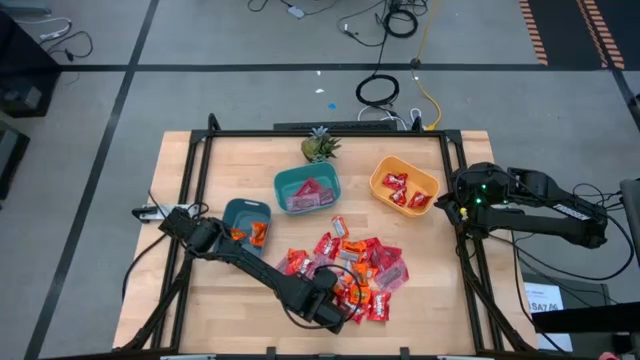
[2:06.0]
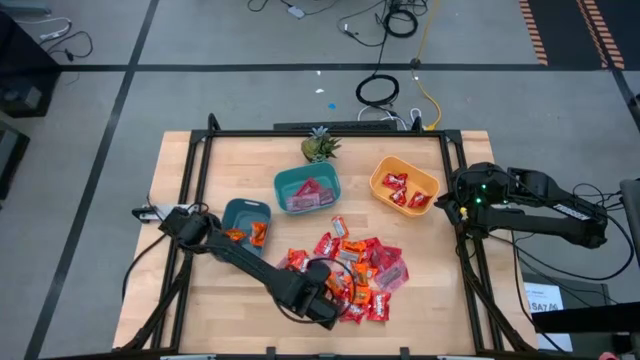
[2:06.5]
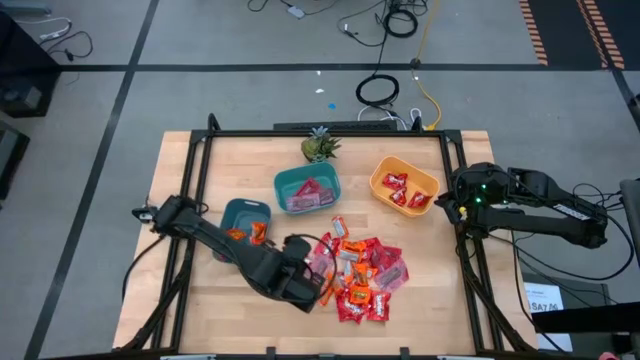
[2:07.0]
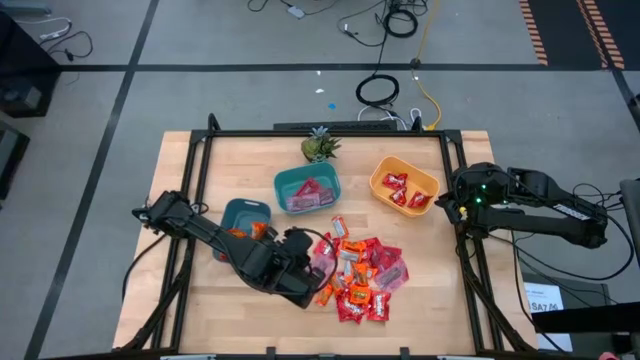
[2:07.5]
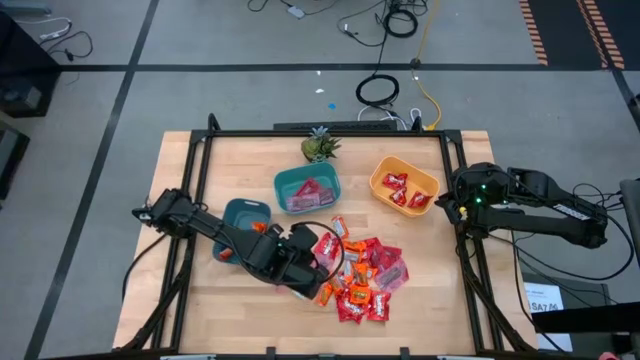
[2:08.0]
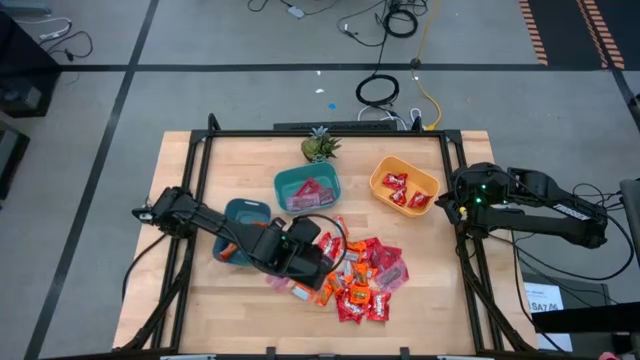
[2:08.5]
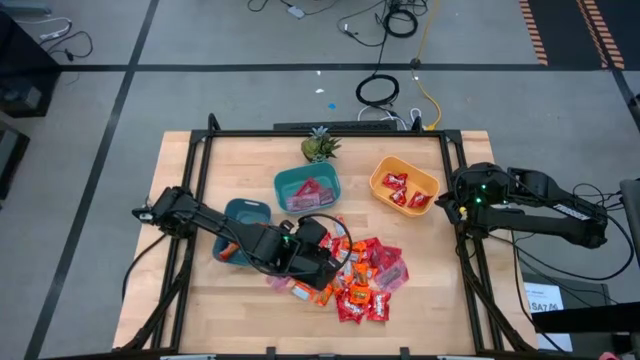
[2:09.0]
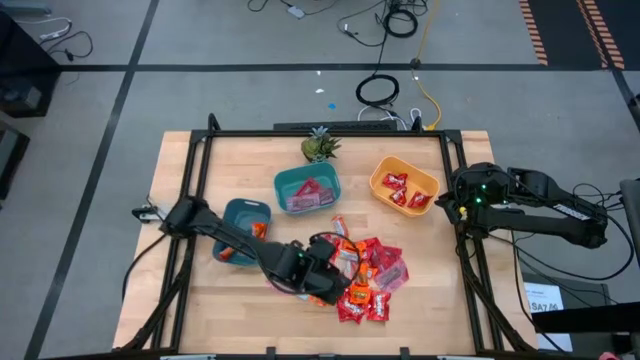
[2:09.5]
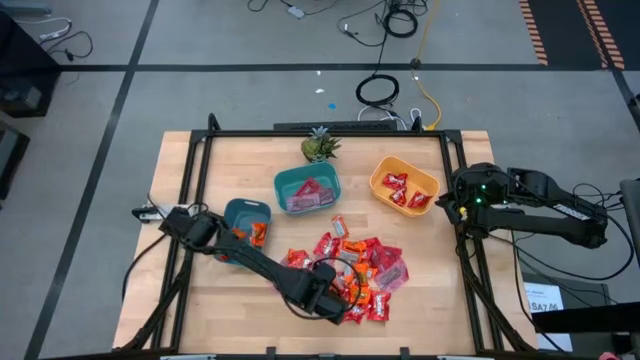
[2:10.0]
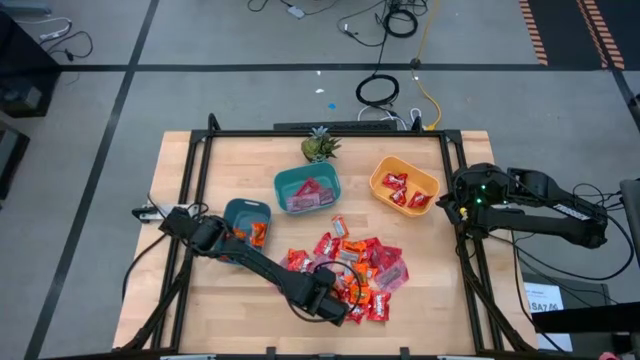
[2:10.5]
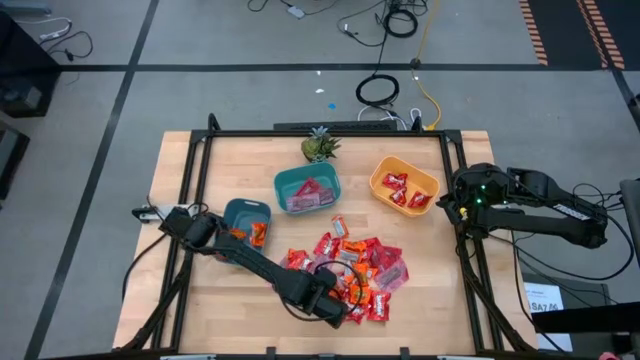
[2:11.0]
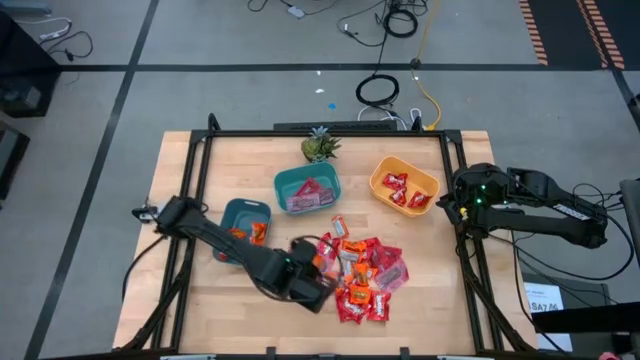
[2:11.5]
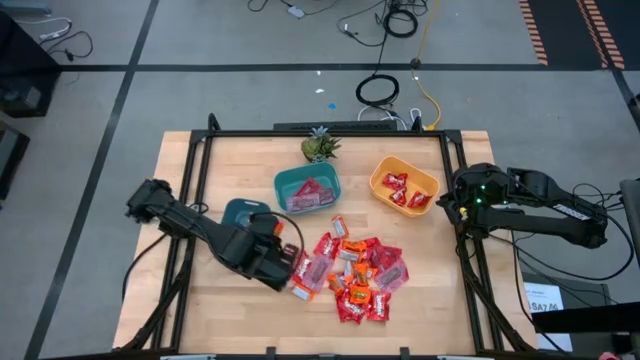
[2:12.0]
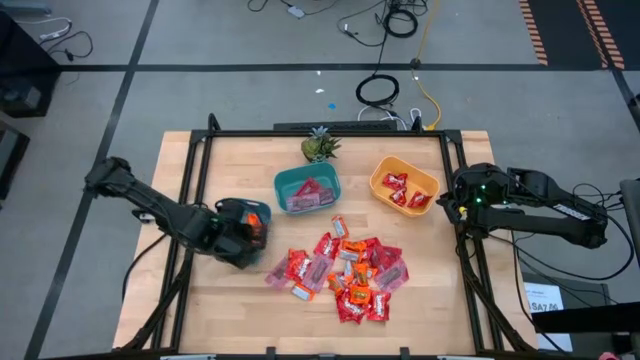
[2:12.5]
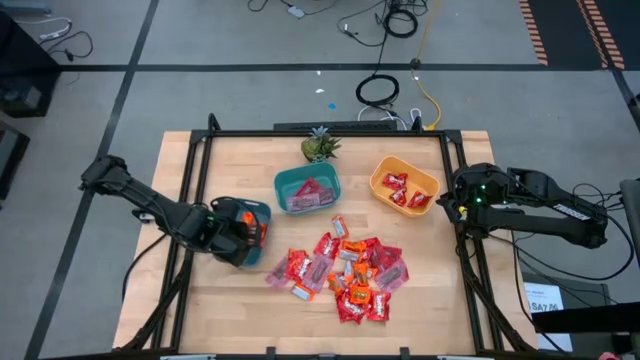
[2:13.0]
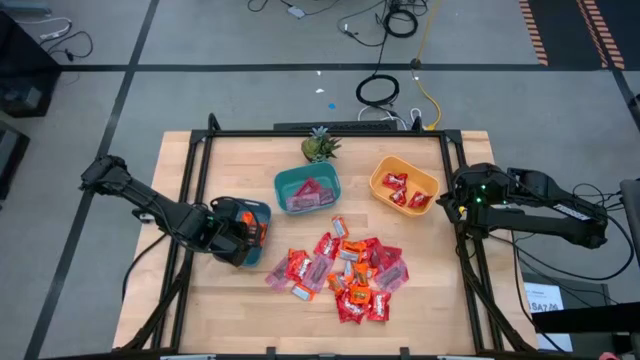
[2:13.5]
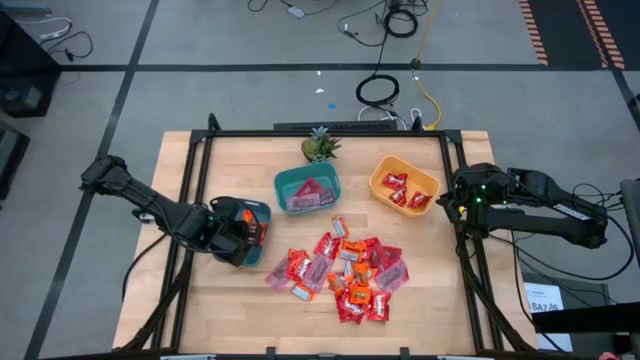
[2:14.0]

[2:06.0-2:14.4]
Task: Sort candy
Put the orange chocolate into the blue bin

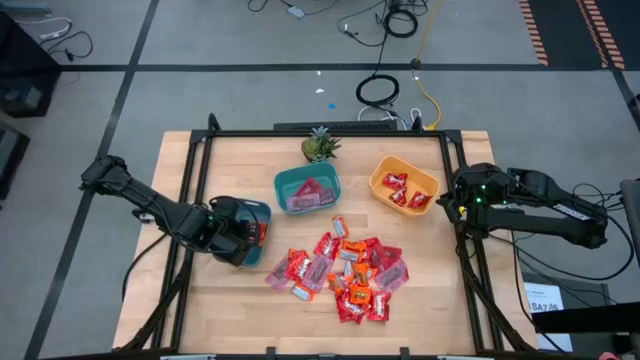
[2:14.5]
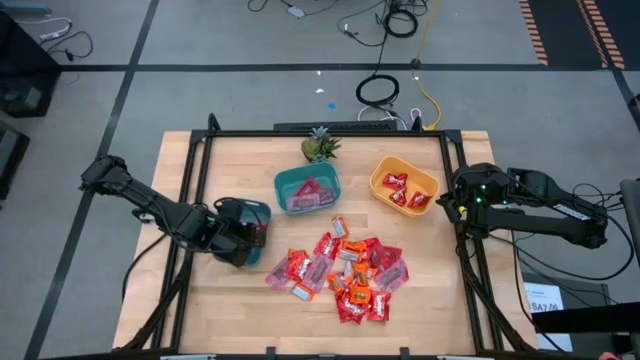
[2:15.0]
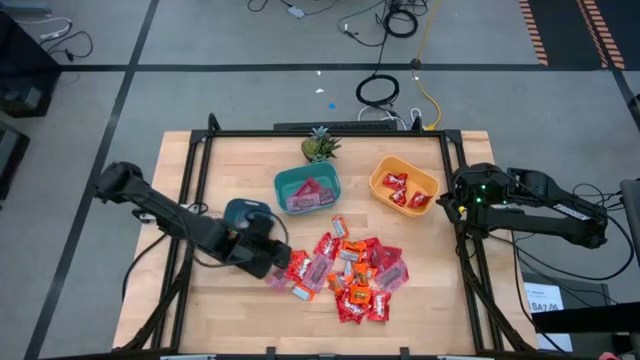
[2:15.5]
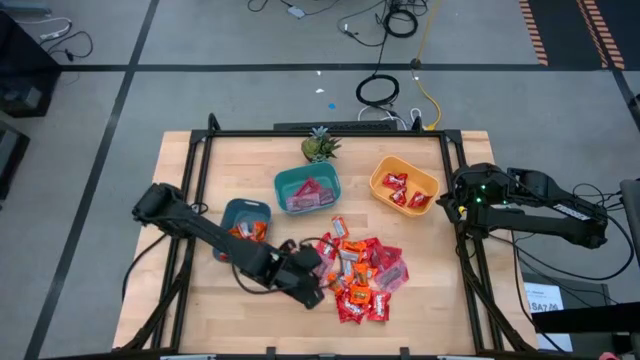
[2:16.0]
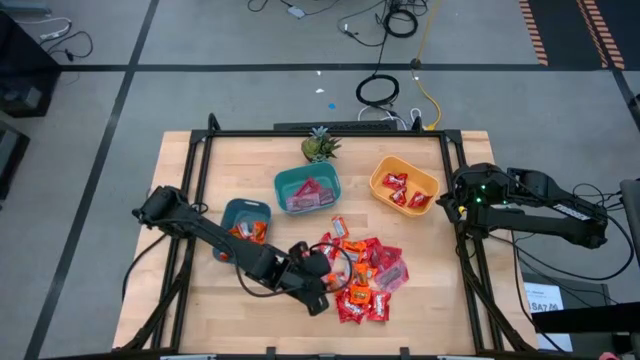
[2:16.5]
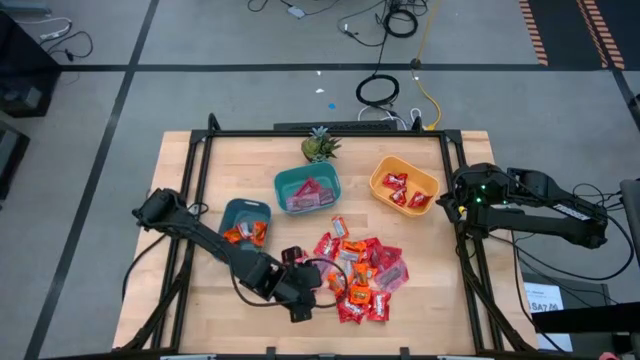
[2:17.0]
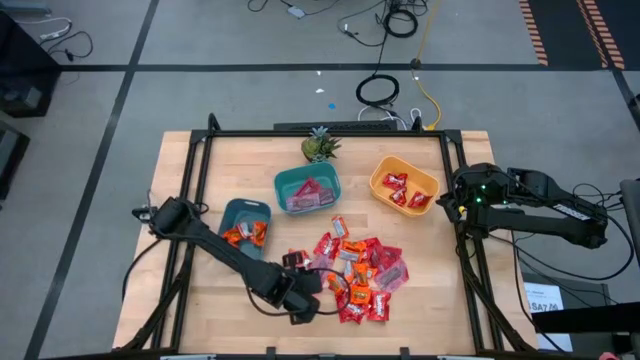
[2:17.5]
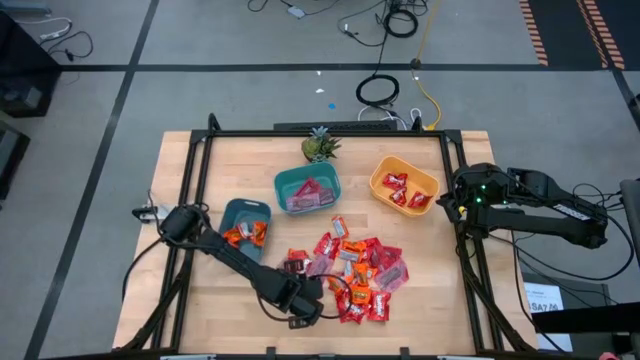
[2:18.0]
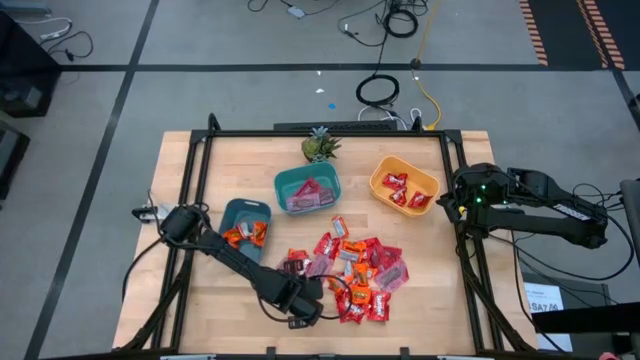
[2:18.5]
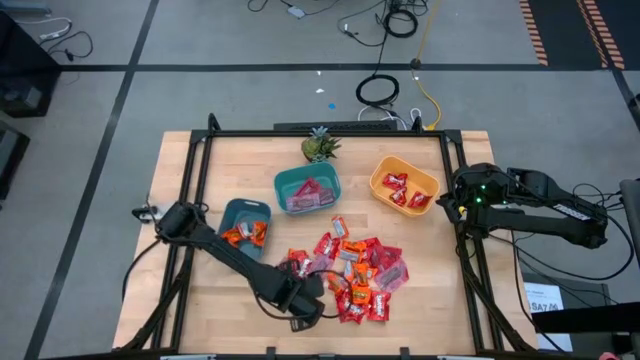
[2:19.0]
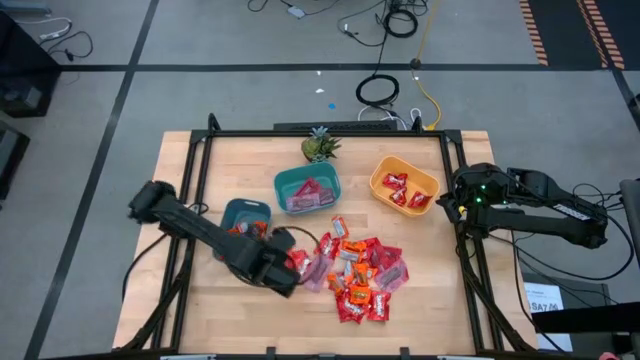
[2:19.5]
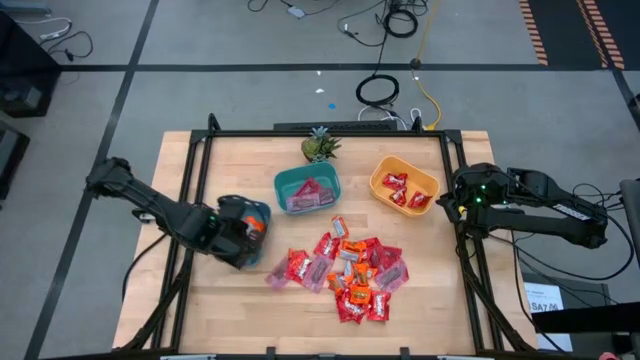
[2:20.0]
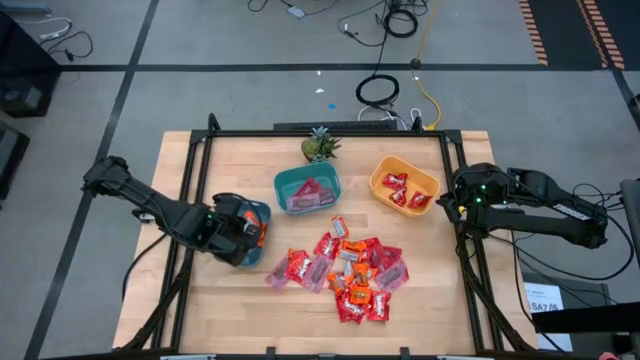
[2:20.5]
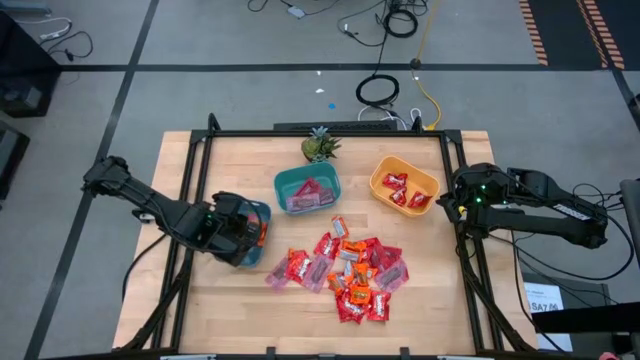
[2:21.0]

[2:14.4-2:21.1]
Put the orange chocolate into the blue bin

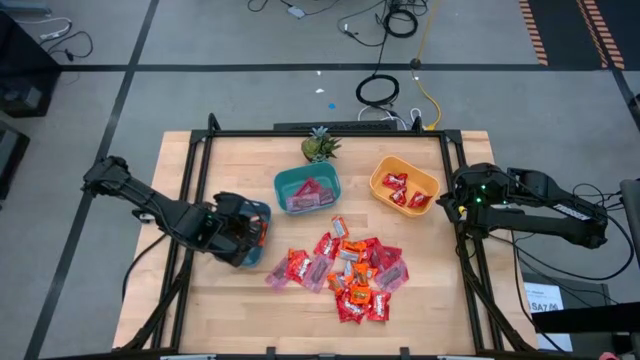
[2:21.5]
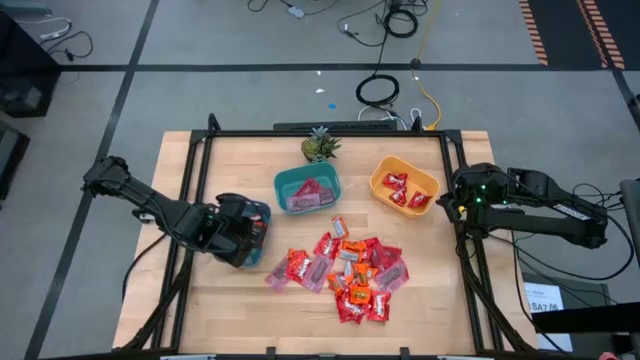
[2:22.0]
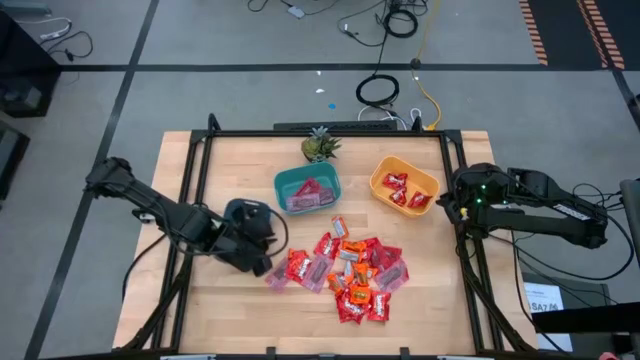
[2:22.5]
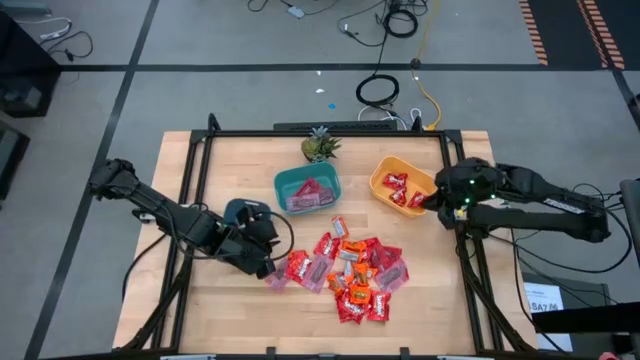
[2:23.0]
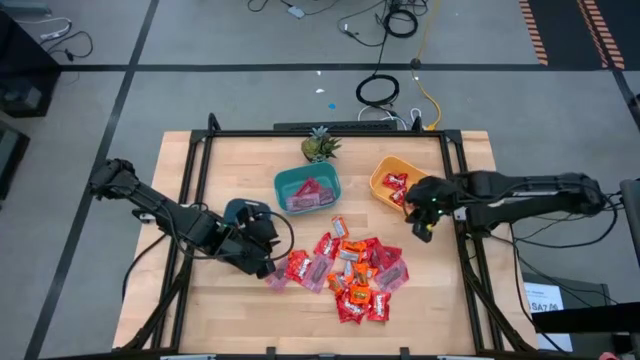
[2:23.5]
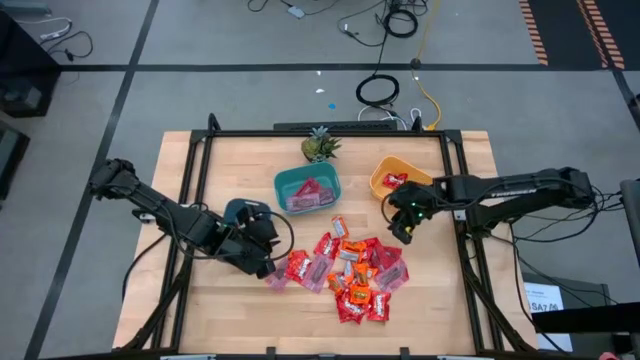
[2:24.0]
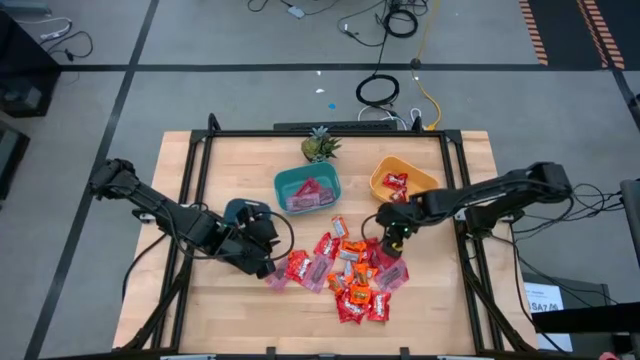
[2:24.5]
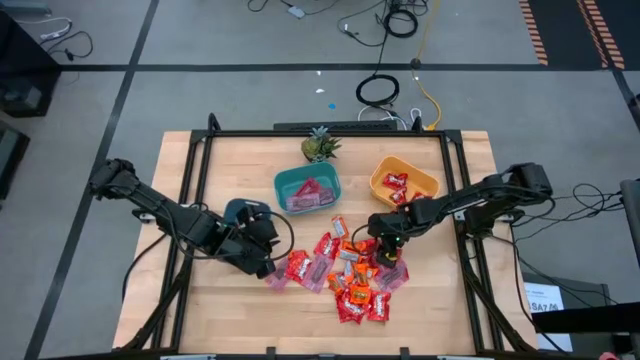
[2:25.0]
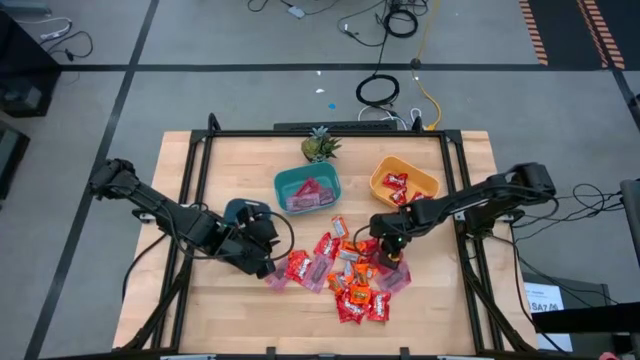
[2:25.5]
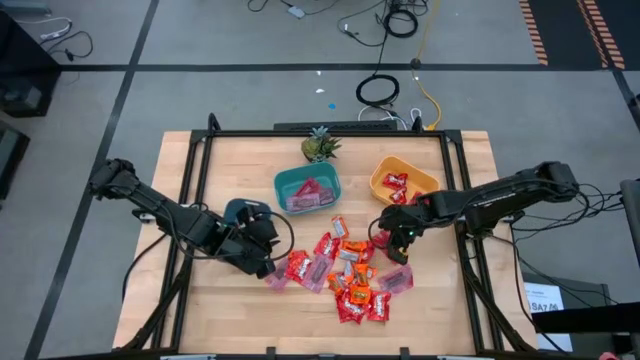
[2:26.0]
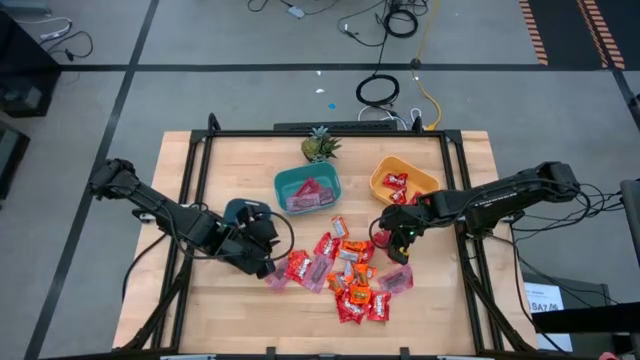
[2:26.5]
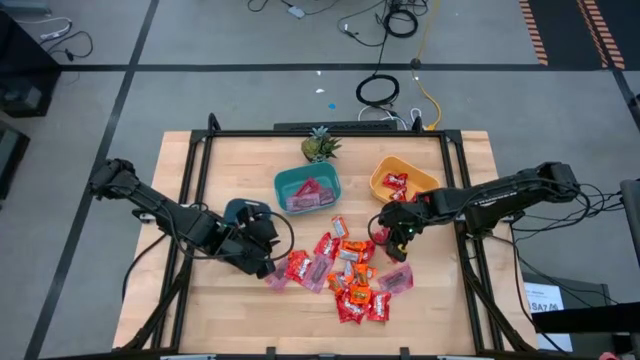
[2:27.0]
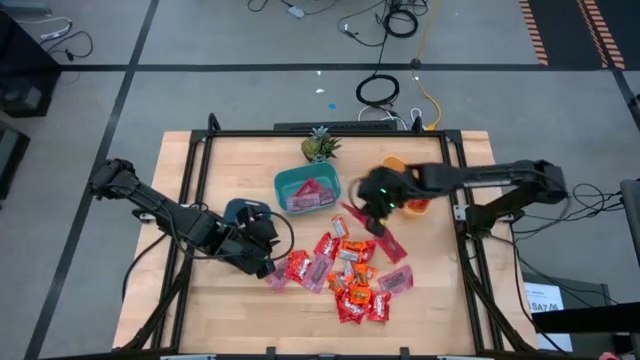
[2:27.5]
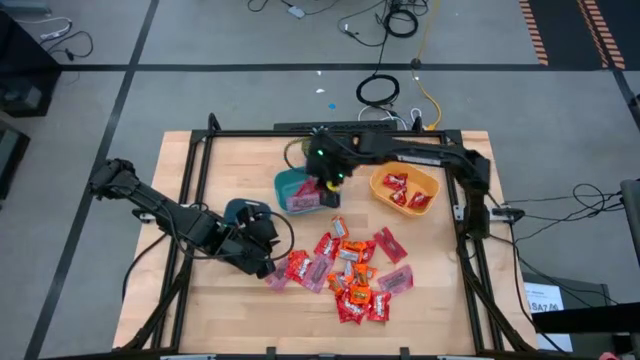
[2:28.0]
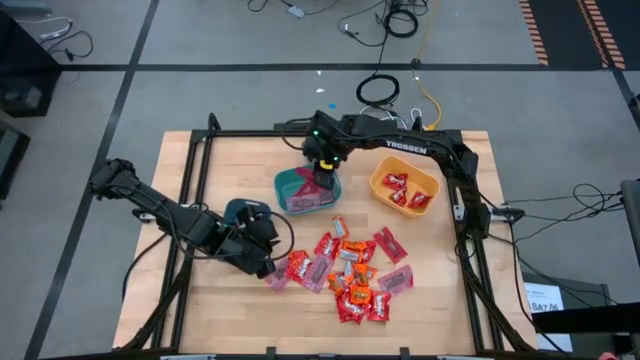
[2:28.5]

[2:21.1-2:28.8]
Put the pink candy into the light blue bin
